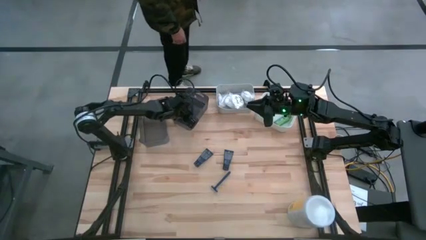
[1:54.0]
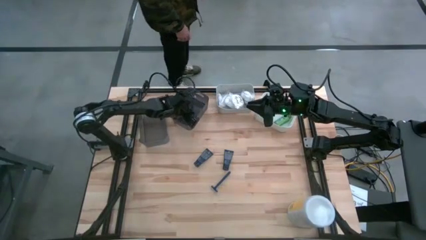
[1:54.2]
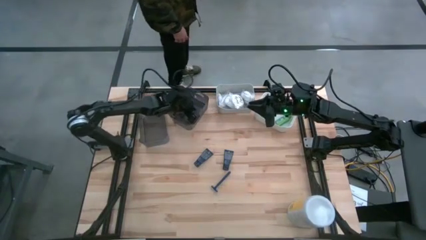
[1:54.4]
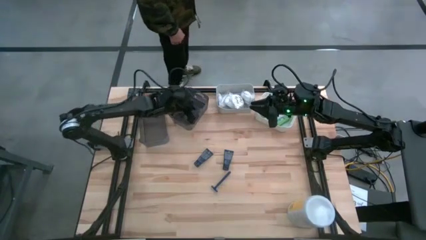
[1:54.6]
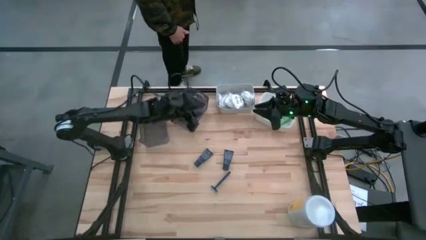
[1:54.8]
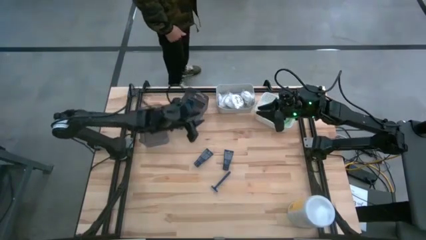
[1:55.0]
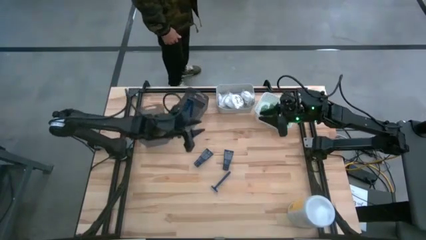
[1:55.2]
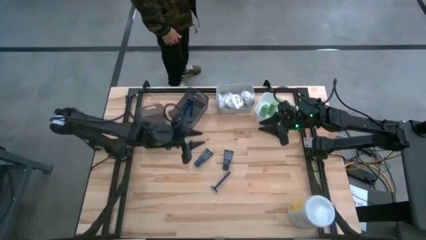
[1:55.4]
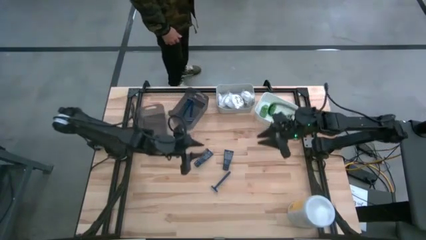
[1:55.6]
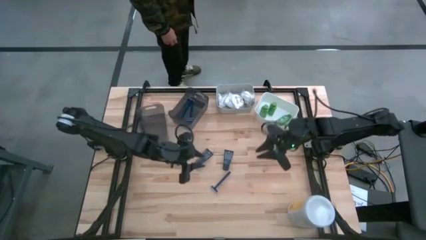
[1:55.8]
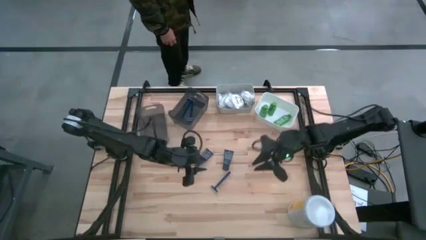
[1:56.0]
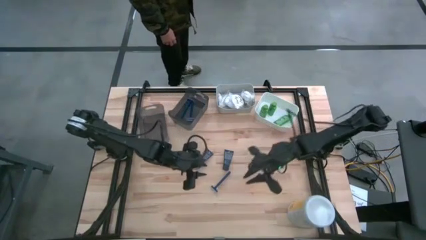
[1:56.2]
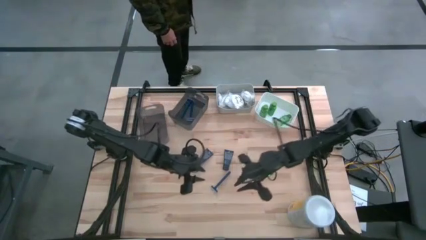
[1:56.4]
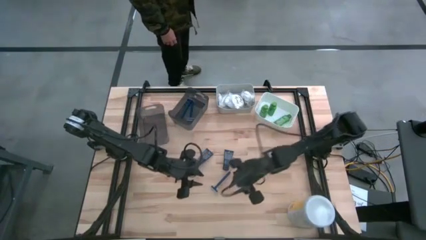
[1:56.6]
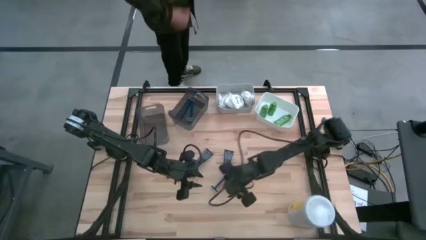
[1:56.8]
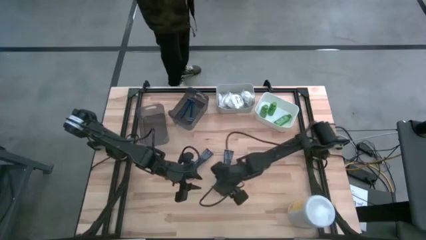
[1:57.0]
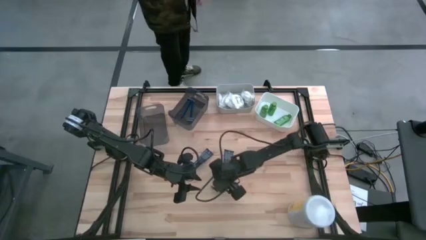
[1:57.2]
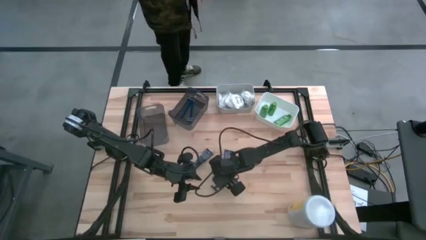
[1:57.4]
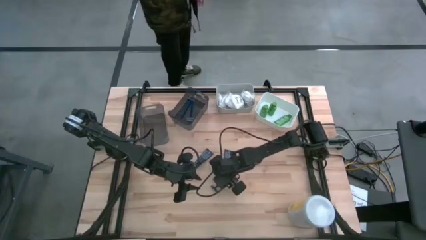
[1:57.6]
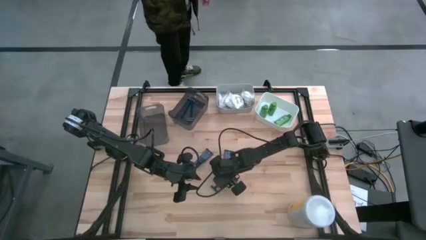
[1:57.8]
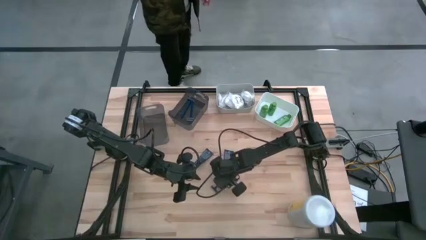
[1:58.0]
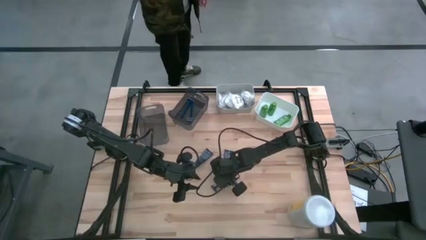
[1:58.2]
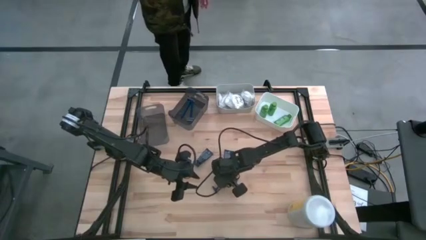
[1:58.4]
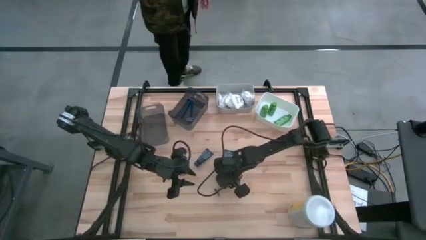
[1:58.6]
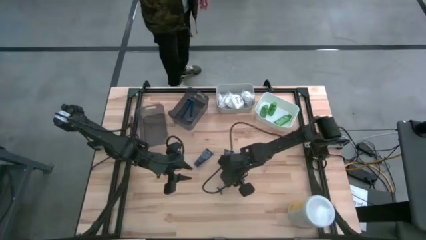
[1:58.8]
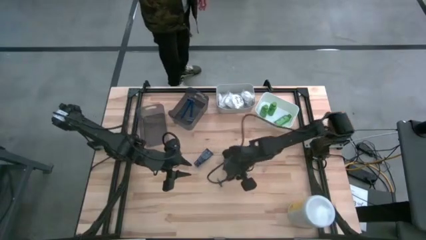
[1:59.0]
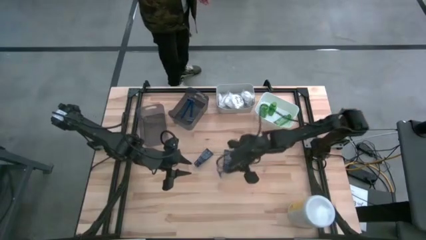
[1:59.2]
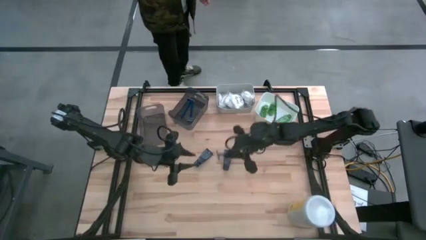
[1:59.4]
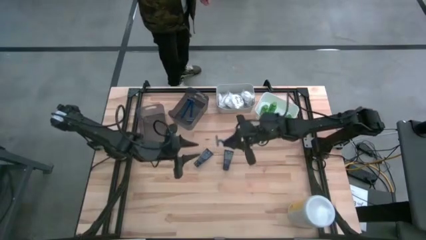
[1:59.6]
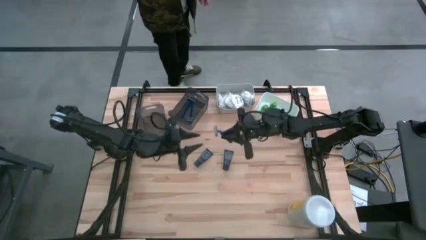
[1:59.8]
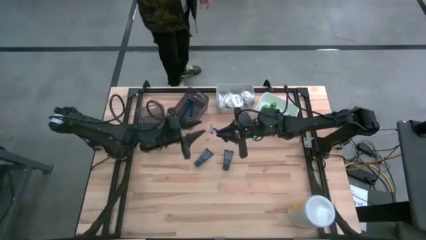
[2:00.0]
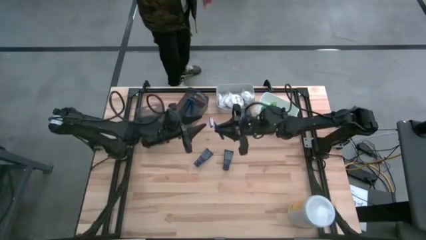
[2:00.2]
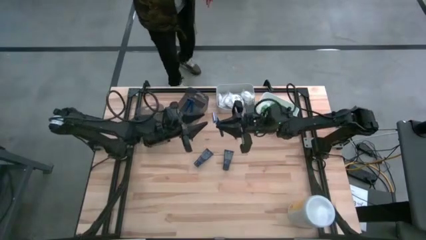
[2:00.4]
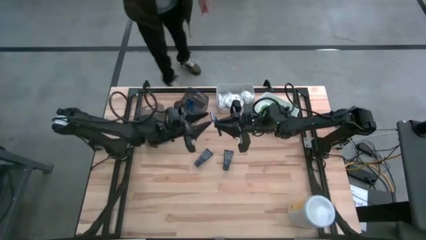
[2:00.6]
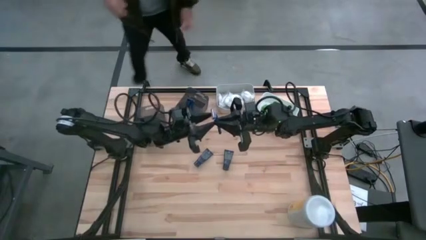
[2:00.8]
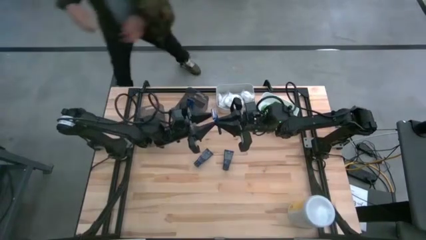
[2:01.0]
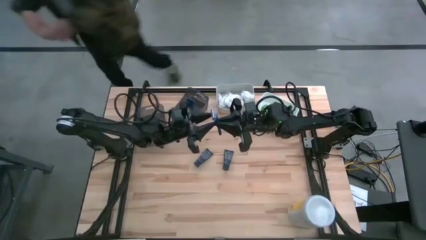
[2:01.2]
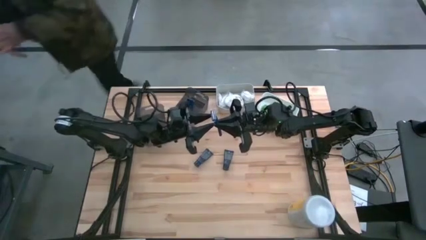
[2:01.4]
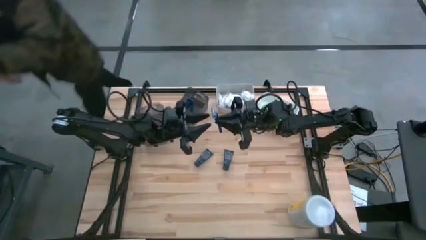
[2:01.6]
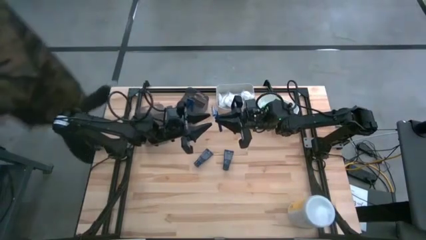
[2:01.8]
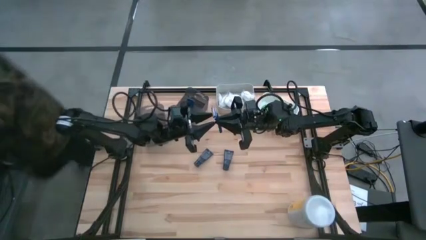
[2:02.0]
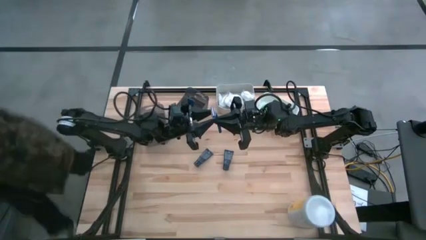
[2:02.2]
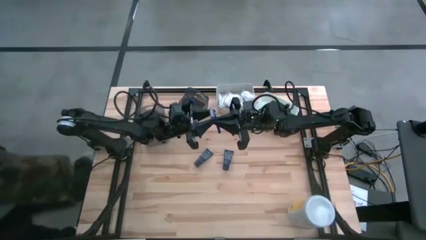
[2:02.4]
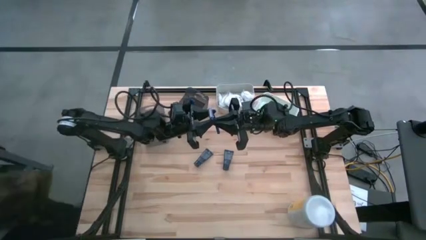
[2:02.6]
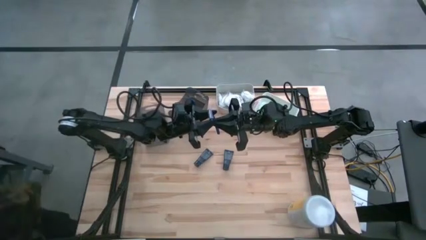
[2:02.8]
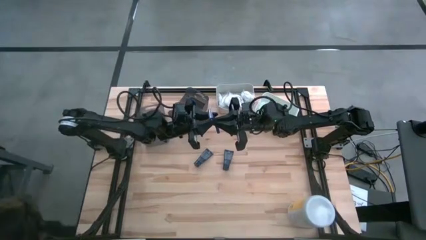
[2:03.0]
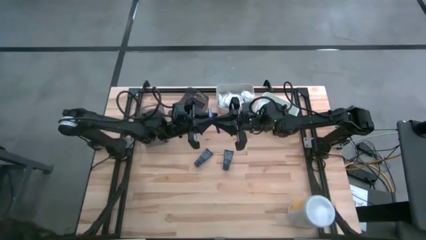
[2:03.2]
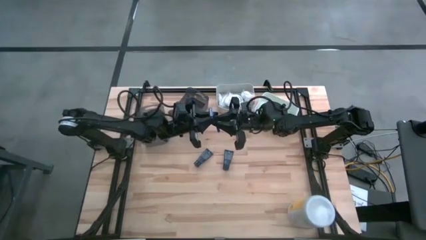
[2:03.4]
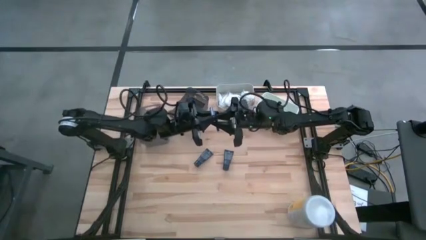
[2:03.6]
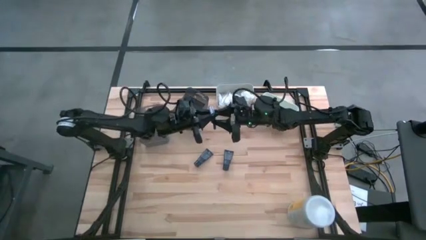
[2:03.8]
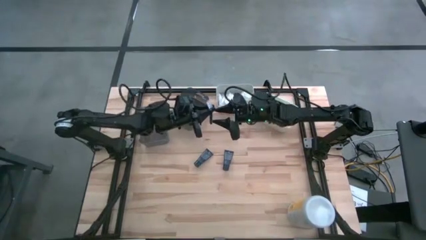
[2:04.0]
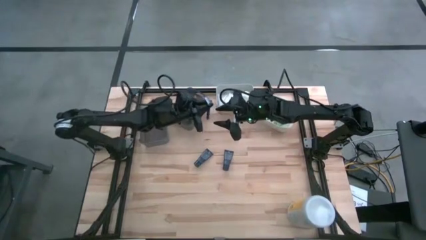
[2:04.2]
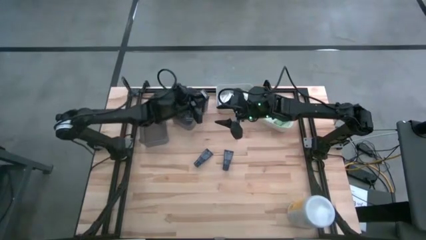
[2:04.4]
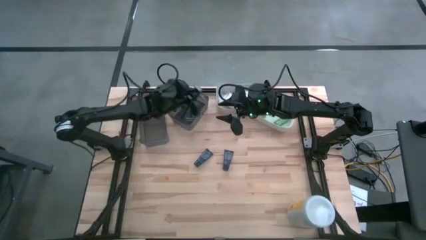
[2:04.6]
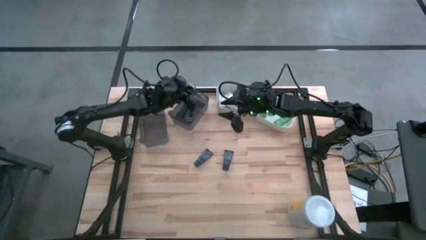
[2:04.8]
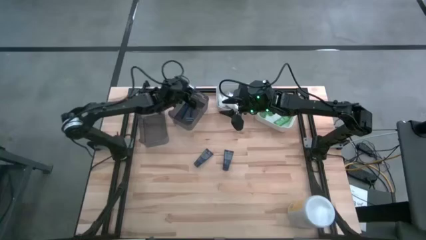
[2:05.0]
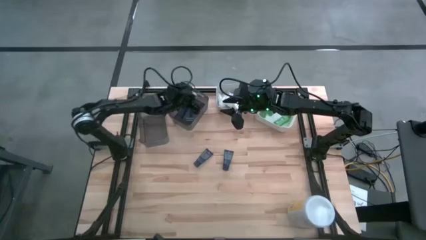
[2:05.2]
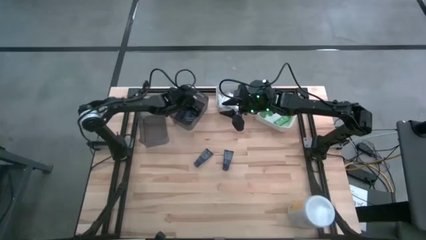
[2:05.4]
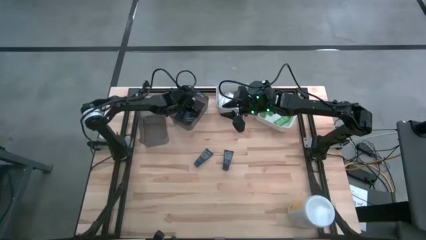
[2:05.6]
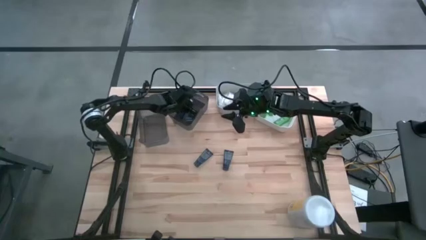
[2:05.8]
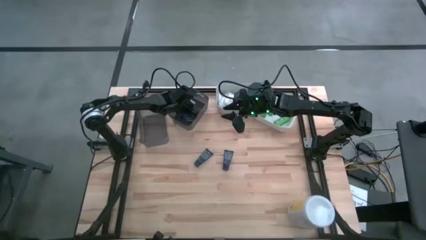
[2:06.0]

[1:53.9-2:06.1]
Task: Pick & Place Travel size toiletries
Put the razor into the right black bin
